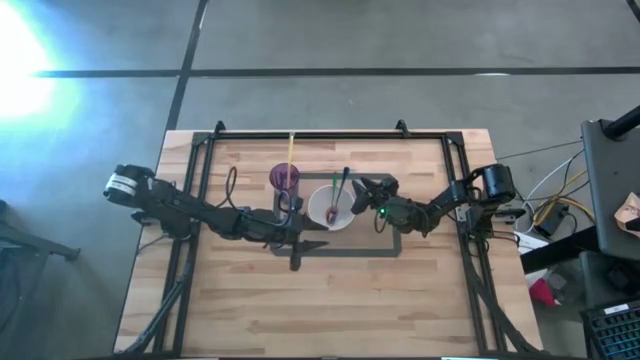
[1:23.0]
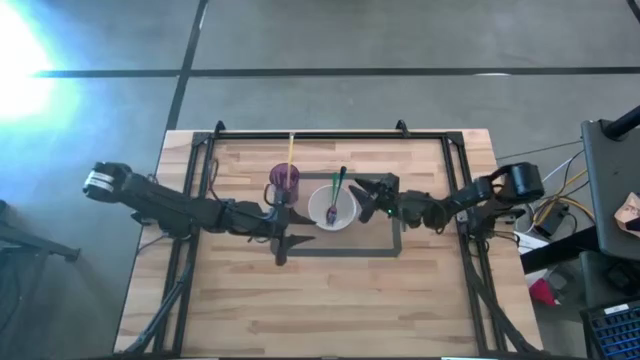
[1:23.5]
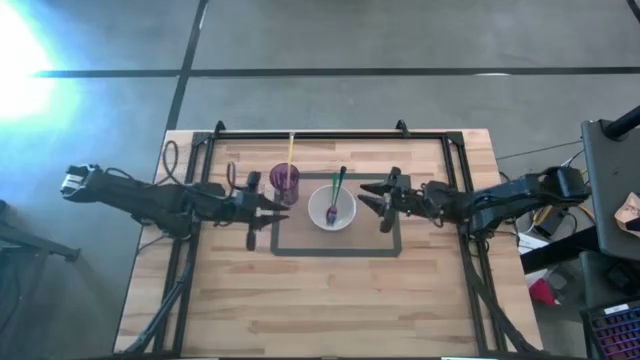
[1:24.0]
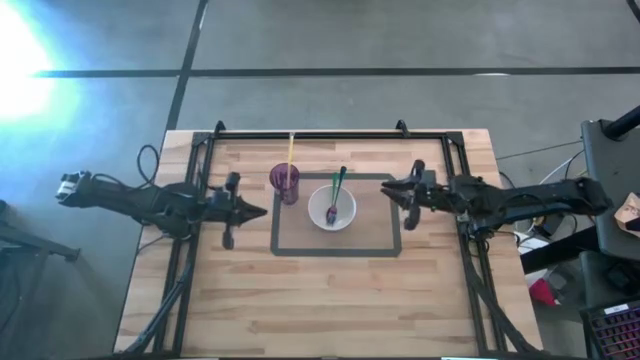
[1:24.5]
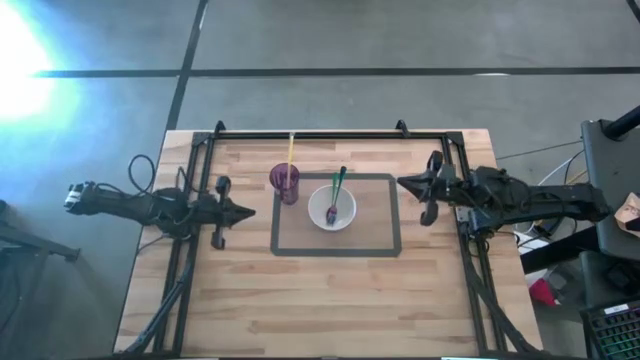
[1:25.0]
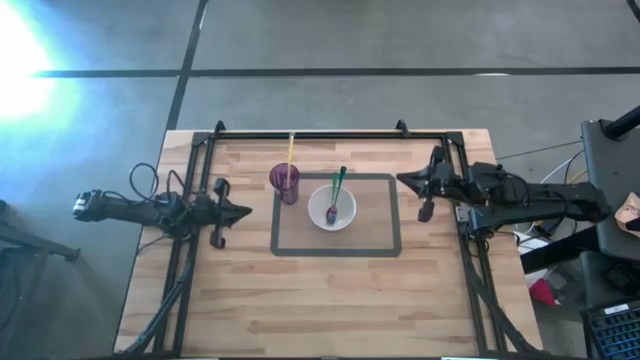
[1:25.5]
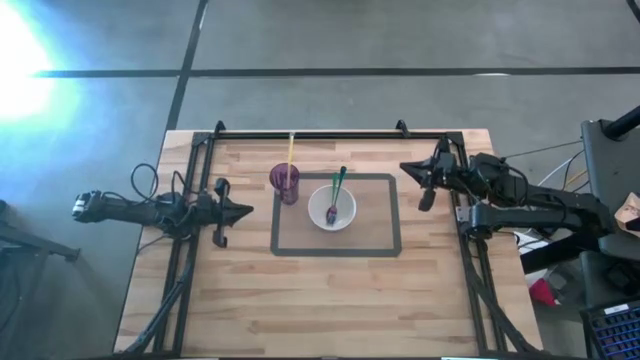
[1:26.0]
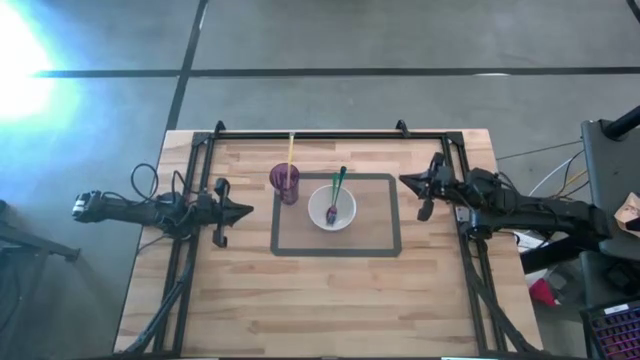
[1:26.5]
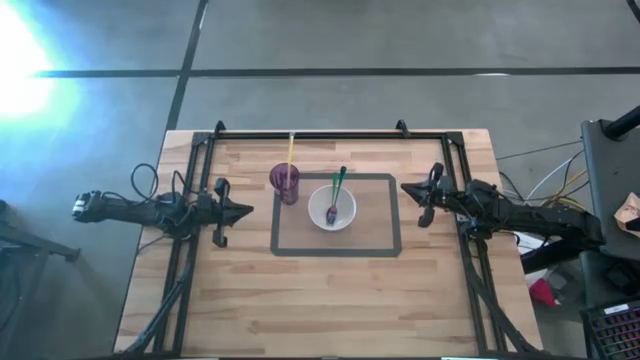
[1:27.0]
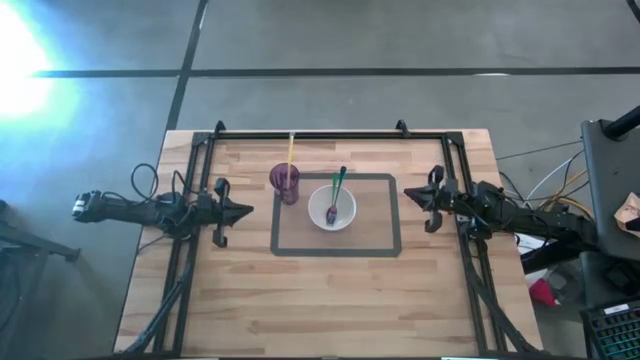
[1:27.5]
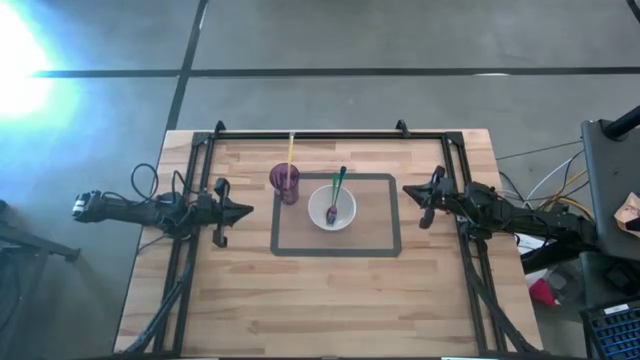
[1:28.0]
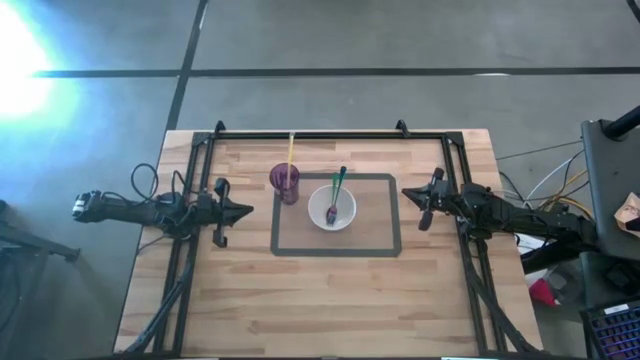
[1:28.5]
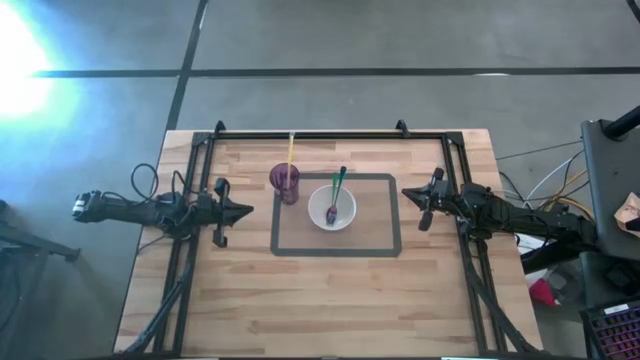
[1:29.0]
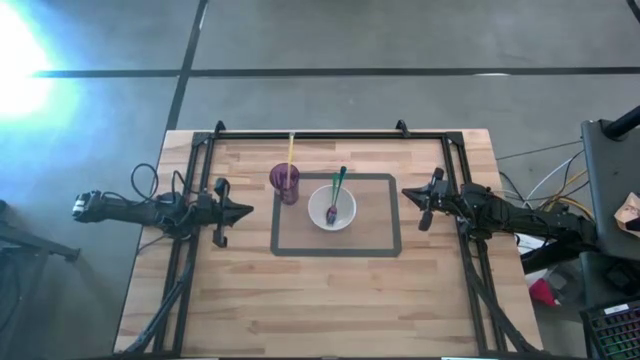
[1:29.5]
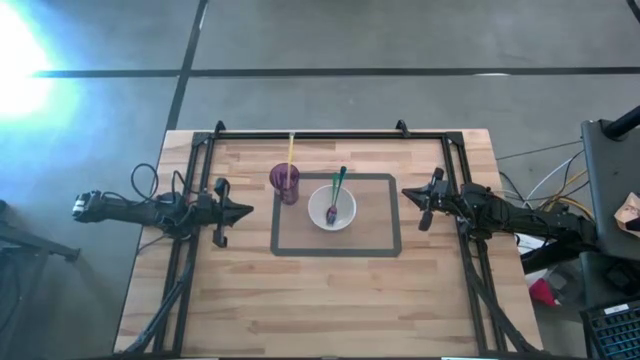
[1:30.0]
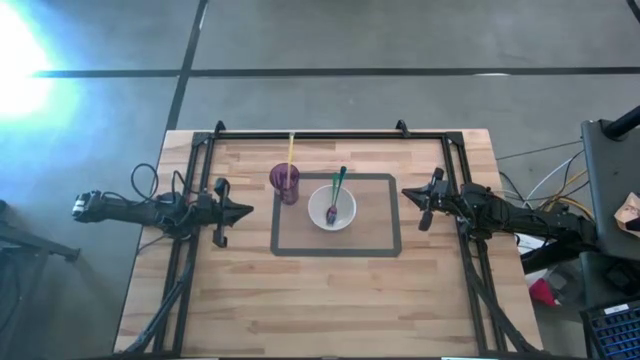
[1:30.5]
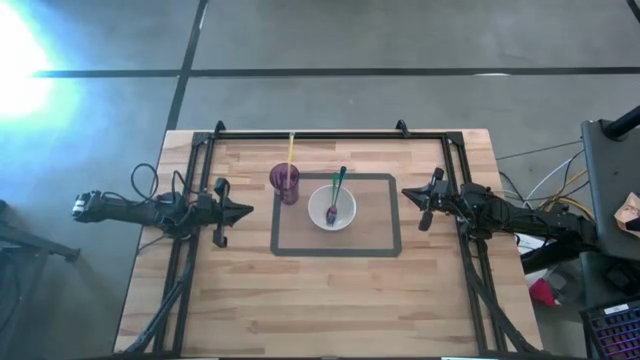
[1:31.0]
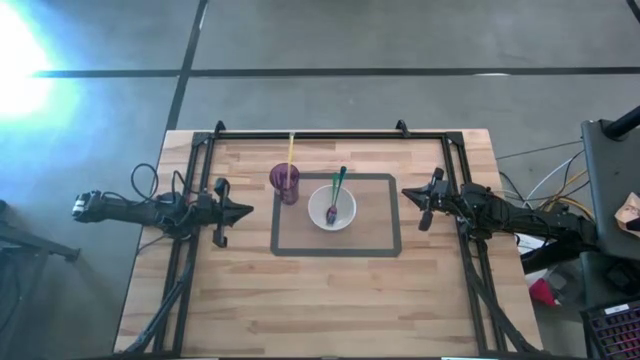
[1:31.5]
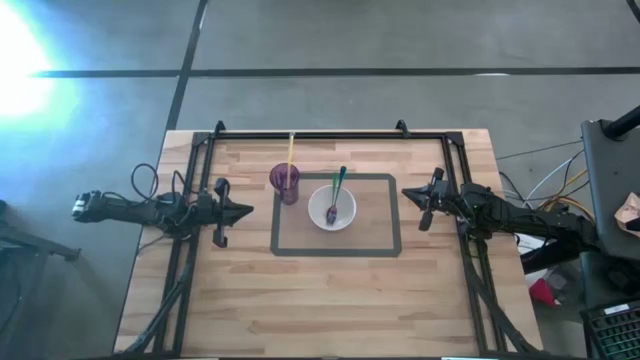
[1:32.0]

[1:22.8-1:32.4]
Task: Pick & Place Utensil
Return to Home Position

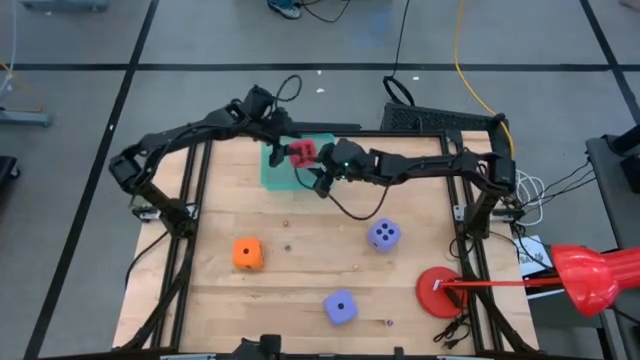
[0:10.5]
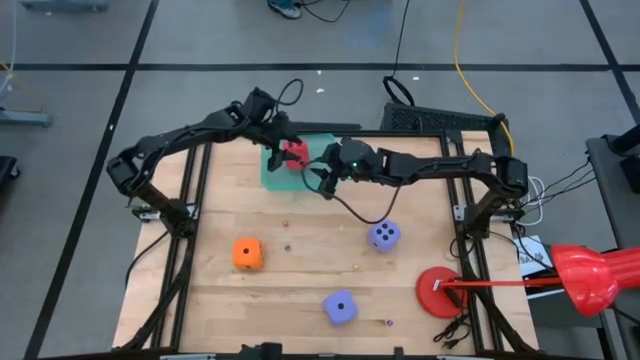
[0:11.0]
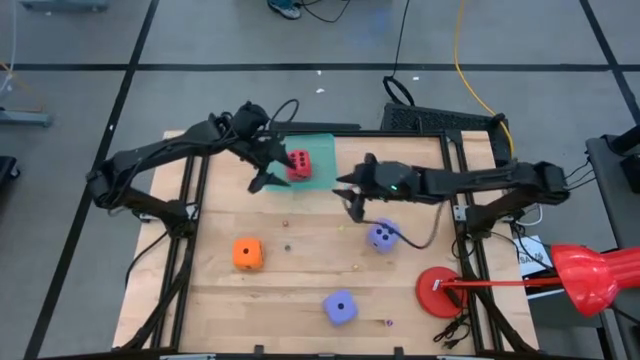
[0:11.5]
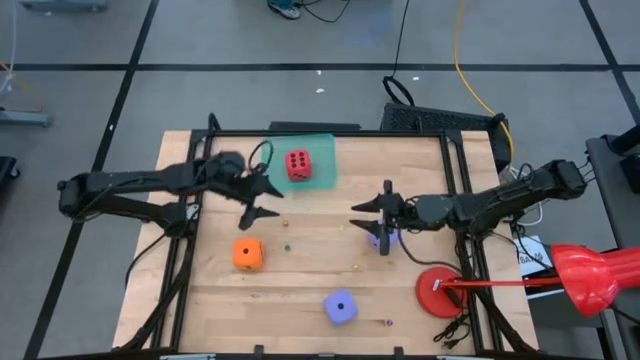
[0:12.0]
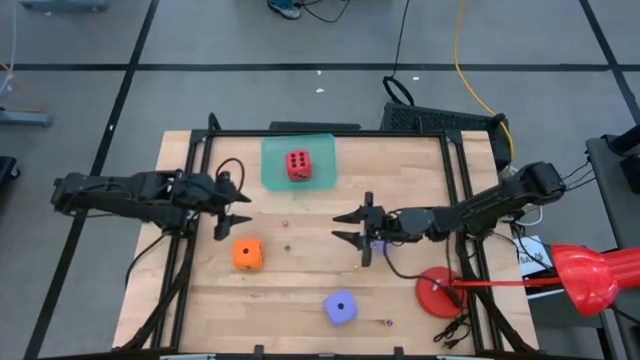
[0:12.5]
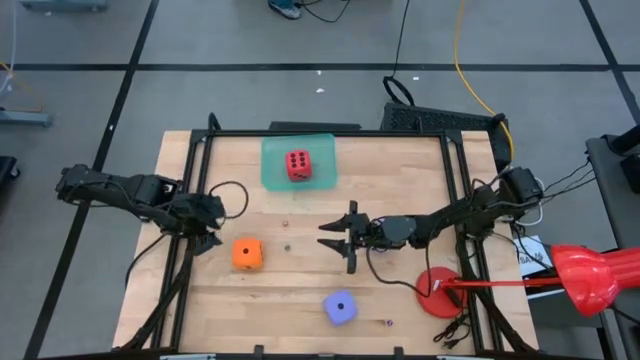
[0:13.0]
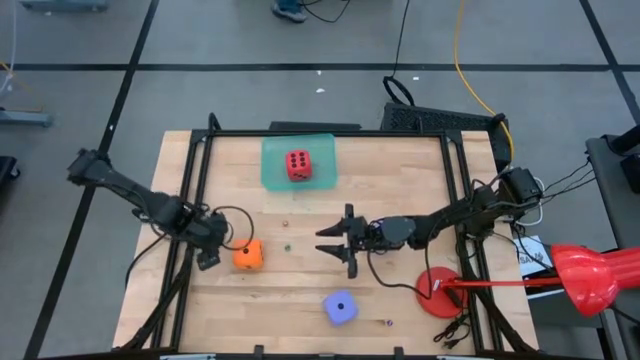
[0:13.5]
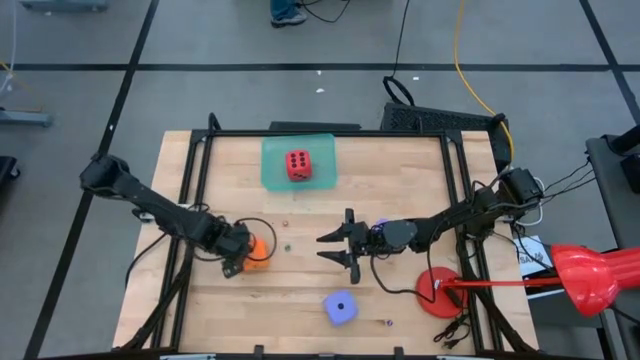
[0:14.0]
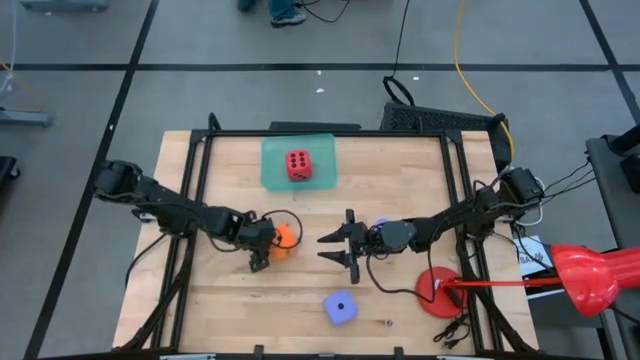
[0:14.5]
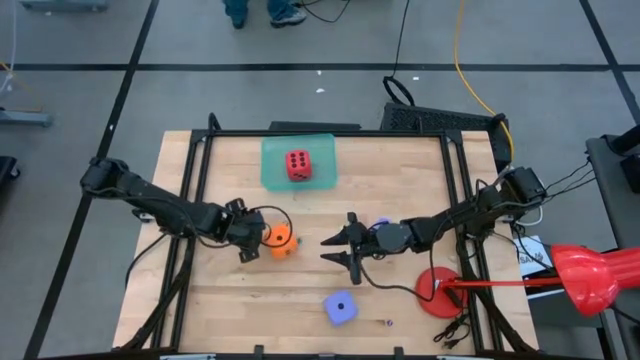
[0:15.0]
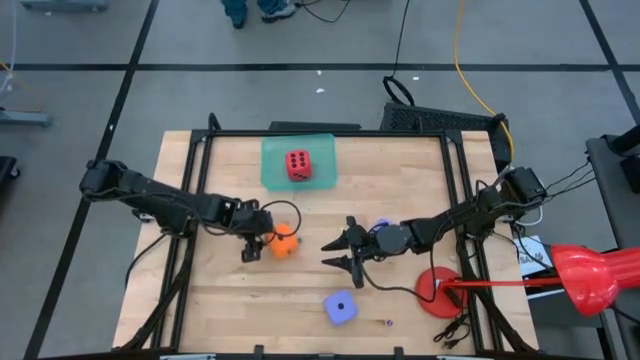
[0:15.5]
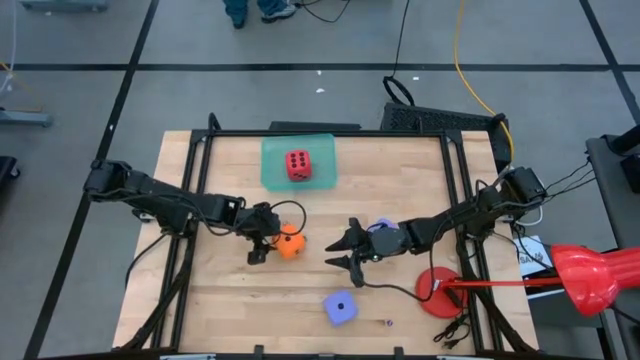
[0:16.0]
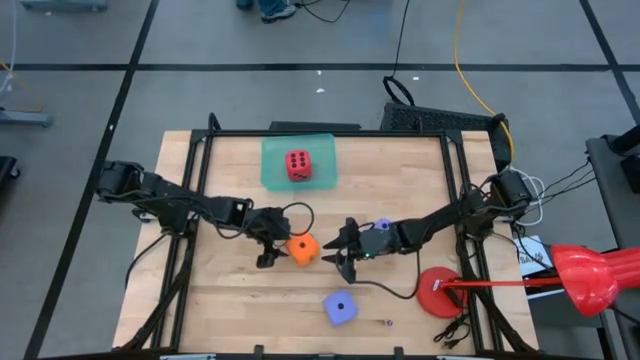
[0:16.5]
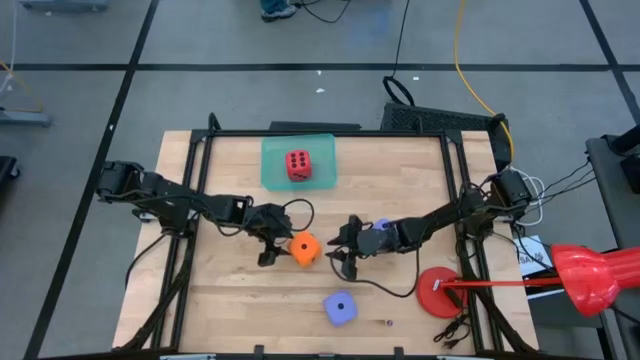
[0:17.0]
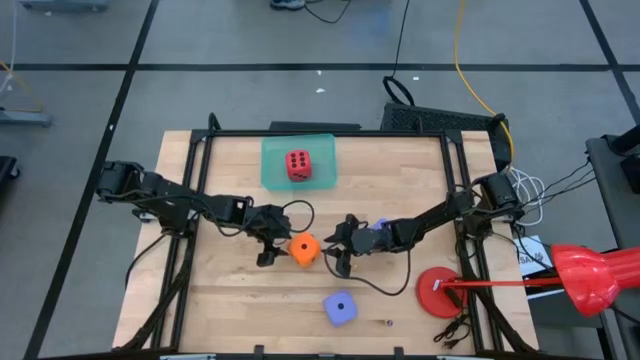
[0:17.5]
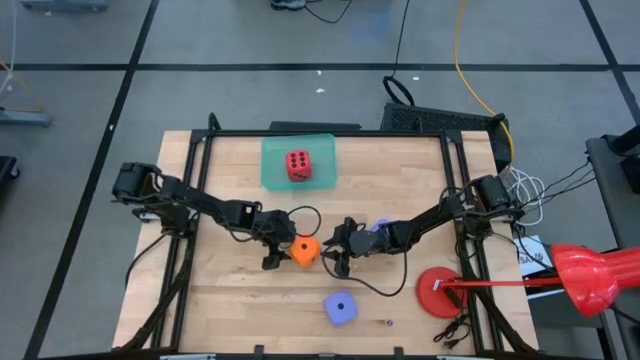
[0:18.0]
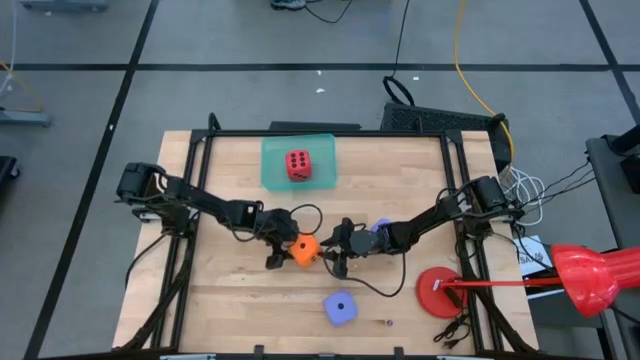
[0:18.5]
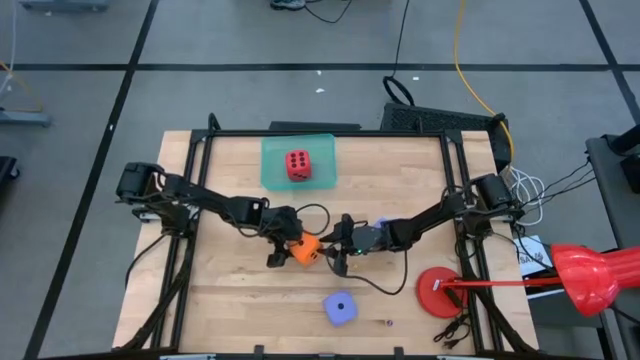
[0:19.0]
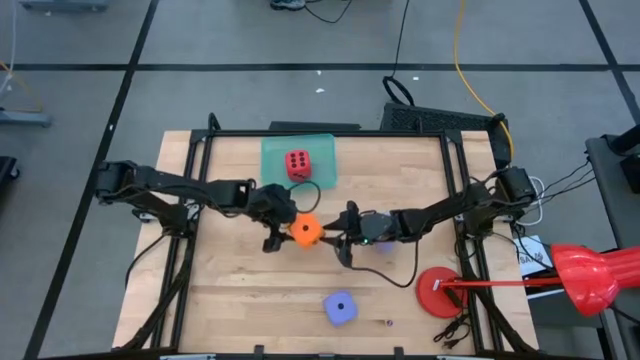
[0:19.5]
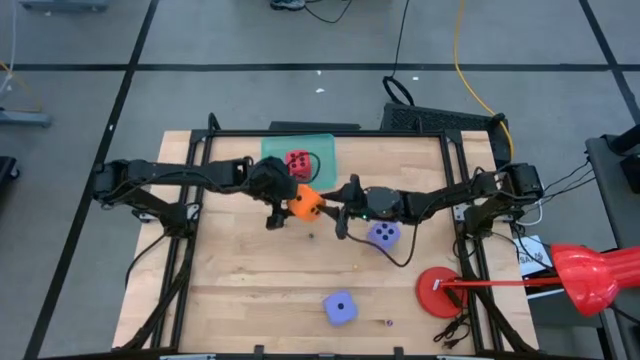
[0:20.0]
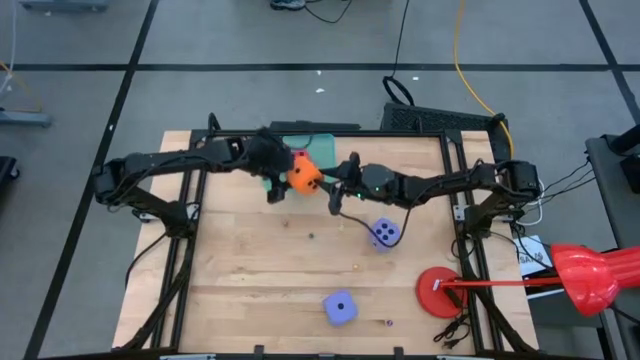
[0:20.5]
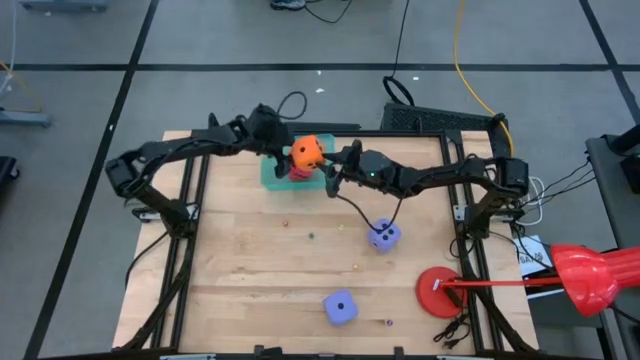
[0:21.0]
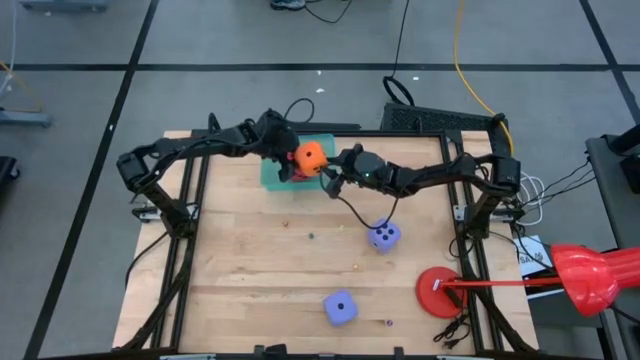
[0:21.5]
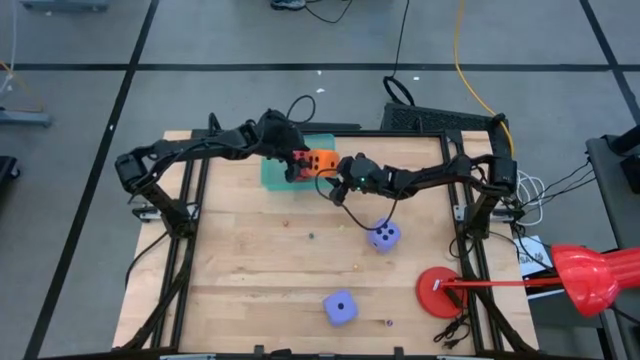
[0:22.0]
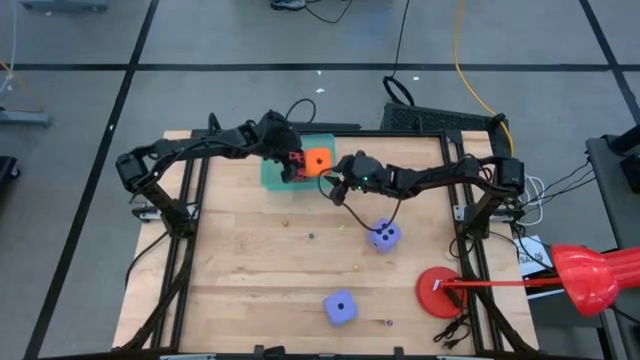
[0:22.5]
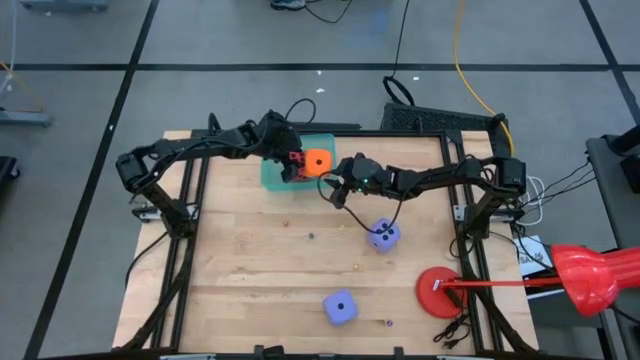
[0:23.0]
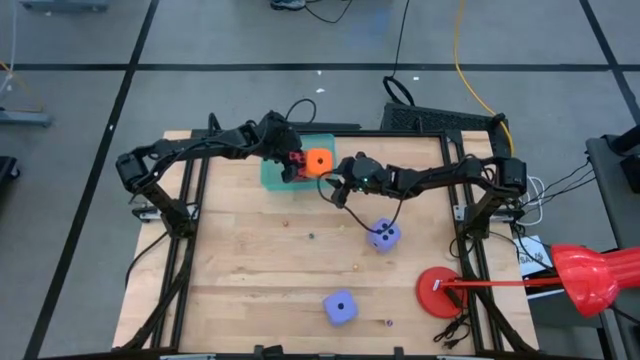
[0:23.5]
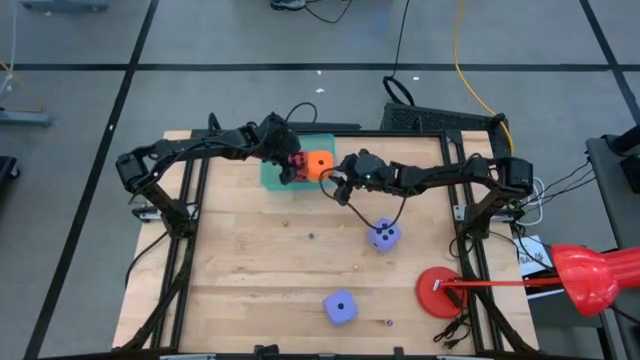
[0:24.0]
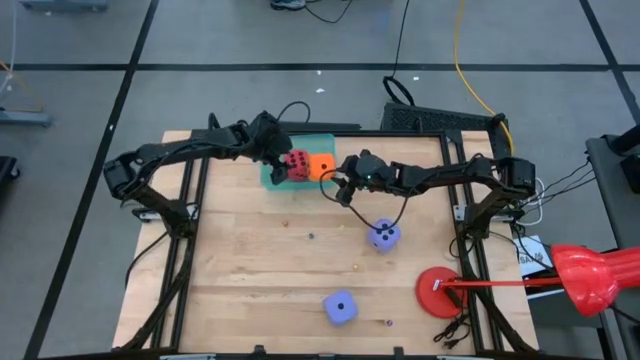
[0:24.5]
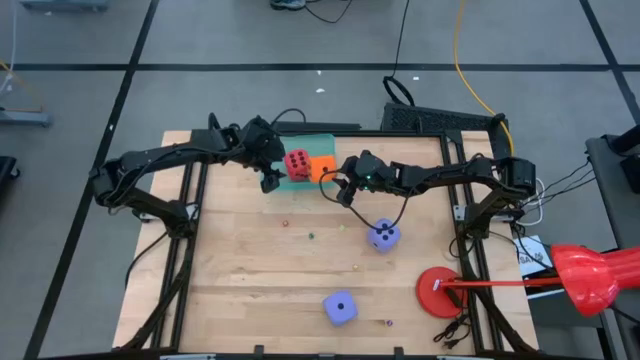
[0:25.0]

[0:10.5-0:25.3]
Task: Pick & Place Dice
Put the large orange dice into the green bin
